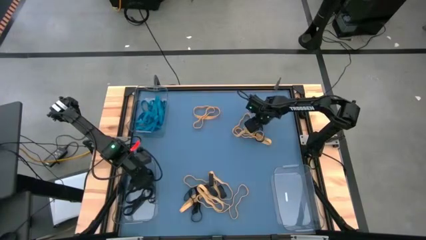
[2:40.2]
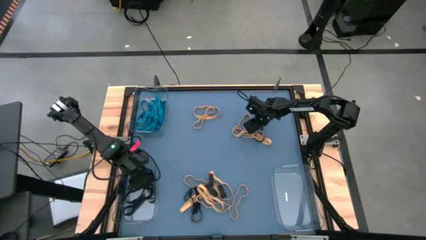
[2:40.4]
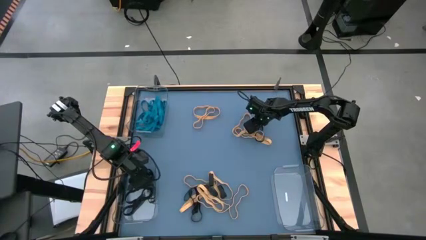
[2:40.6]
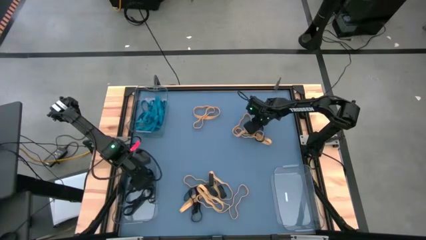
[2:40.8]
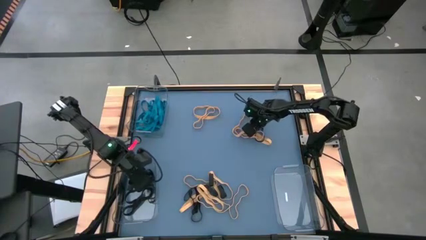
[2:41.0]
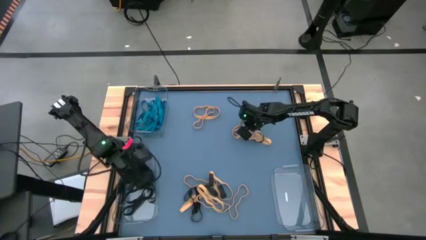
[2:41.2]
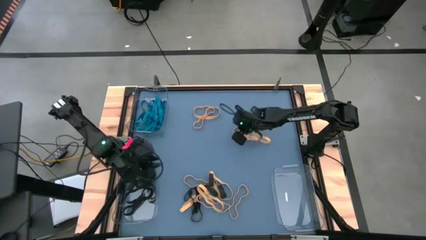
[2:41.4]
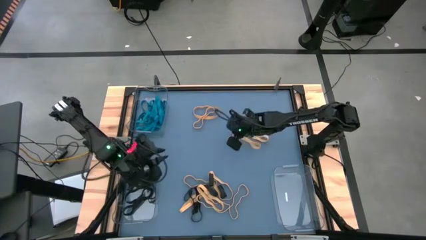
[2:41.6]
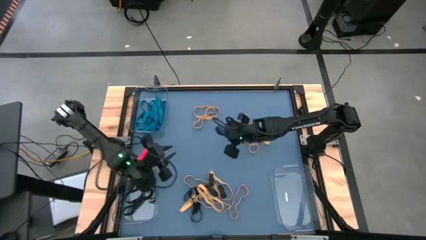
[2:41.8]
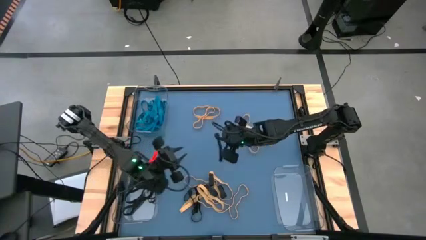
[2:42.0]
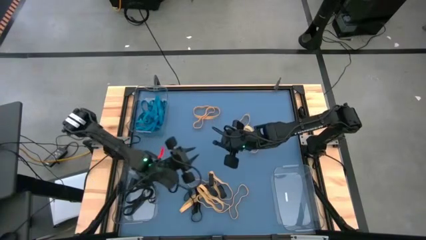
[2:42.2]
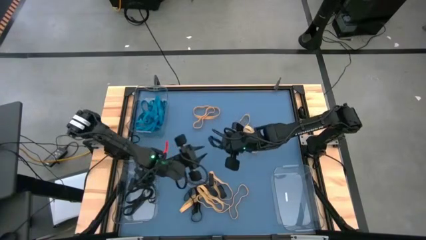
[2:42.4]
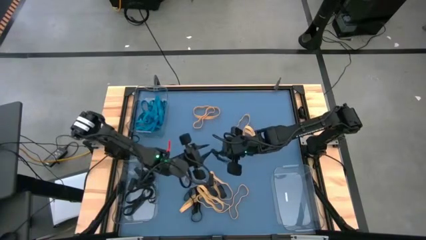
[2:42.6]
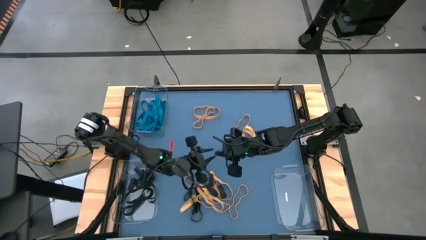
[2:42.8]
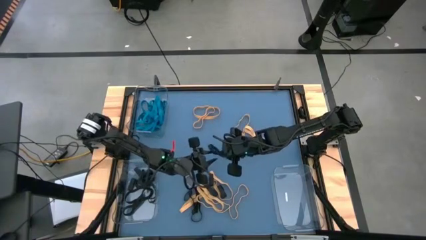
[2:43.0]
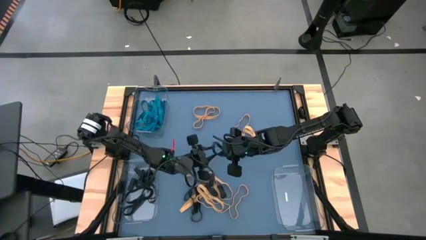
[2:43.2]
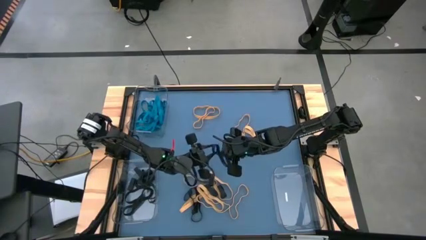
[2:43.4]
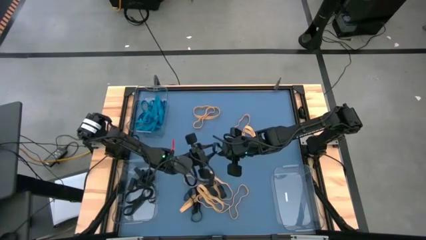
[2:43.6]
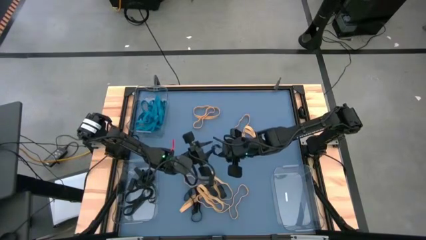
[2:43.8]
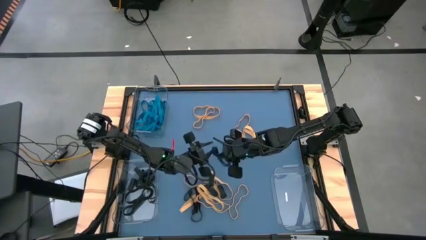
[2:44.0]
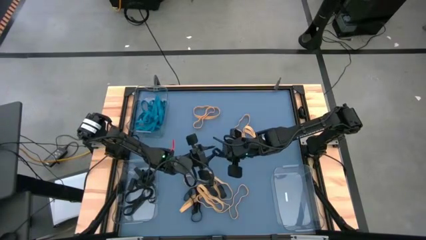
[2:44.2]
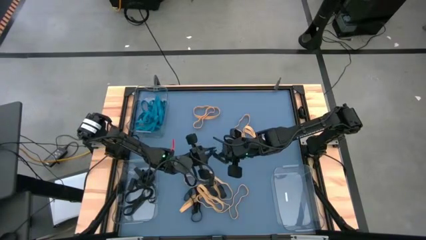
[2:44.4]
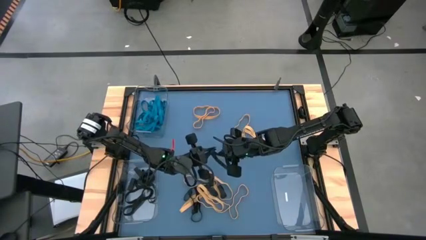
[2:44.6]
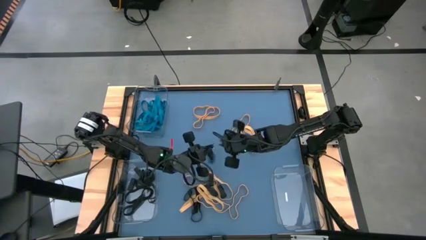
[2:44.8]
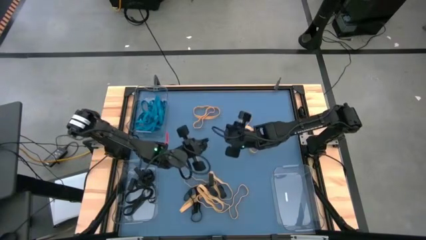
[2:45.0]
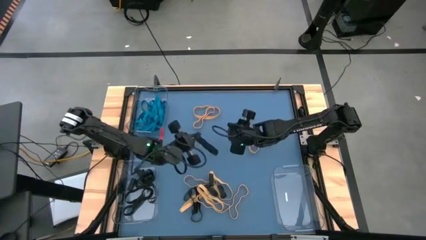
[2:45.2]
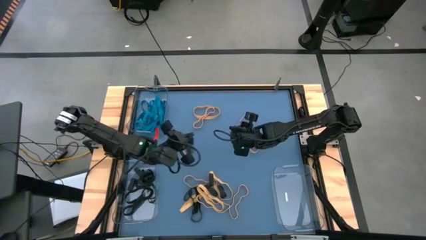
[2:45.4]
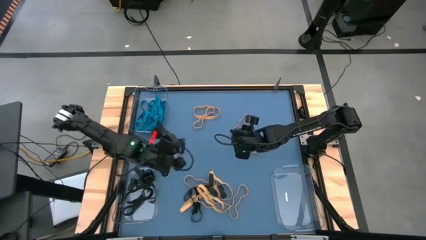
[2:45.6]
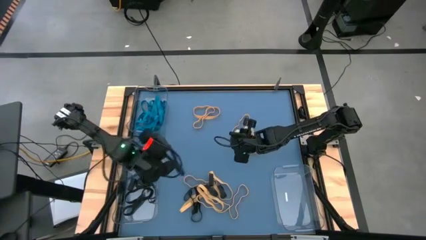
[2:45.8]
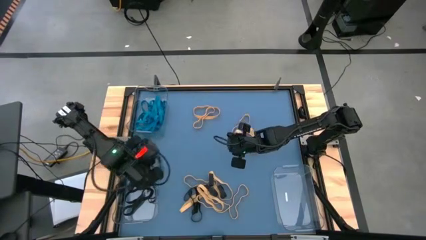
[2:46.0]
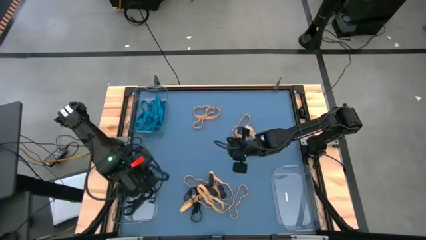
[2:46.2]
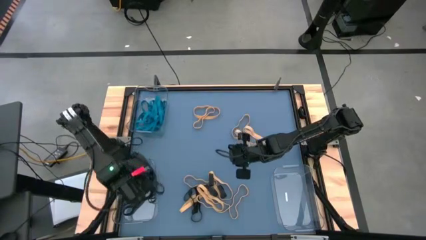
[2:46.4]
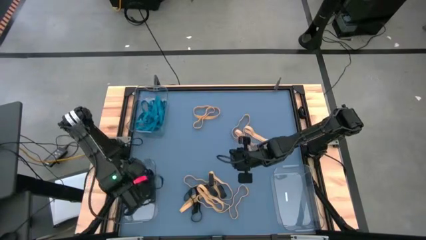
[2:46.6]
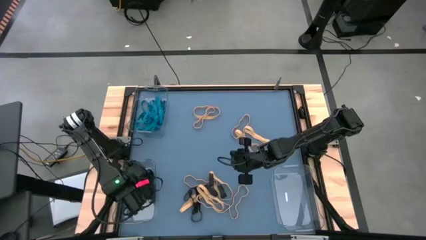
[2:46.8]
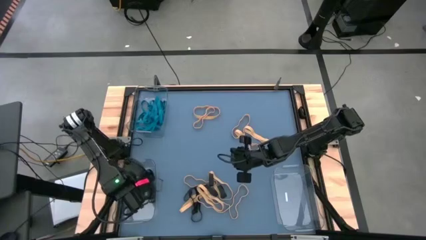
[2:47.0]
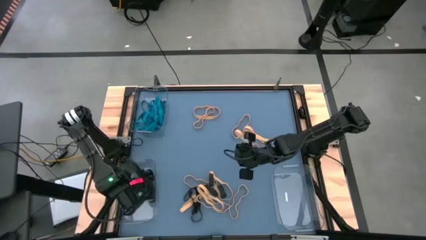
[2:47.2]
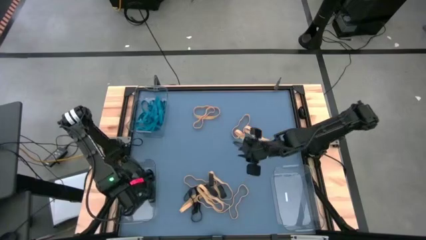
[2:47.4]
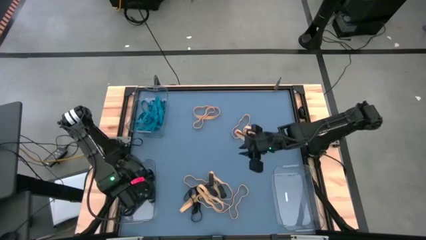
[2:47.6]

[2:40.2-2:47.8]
Task: Sort rubber bands into baskets
Put the black rubber band into the bottom left transparent bin

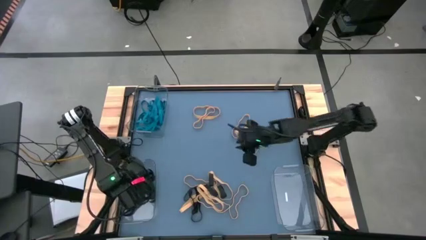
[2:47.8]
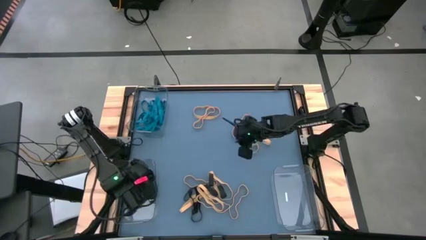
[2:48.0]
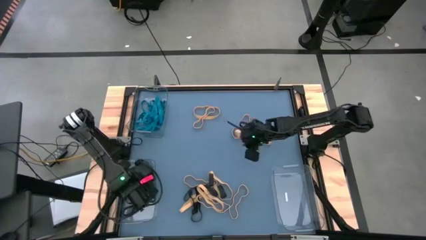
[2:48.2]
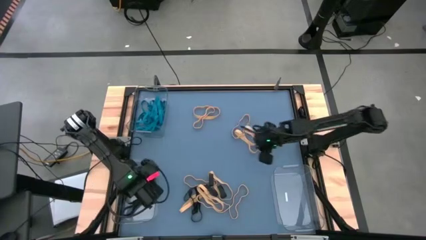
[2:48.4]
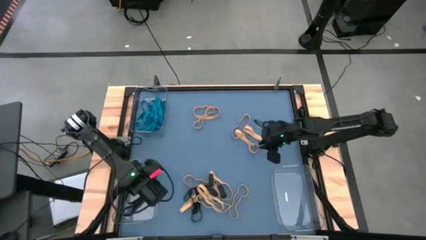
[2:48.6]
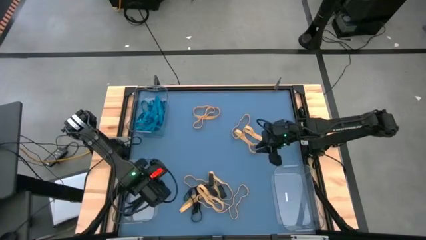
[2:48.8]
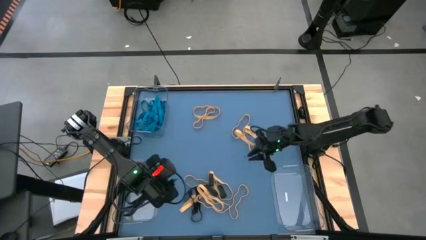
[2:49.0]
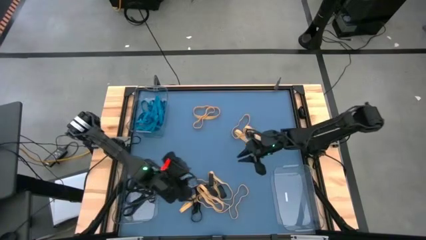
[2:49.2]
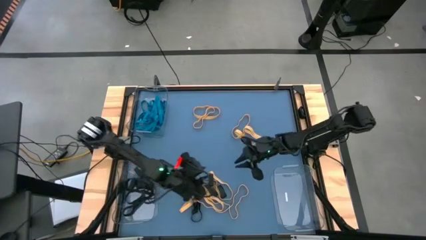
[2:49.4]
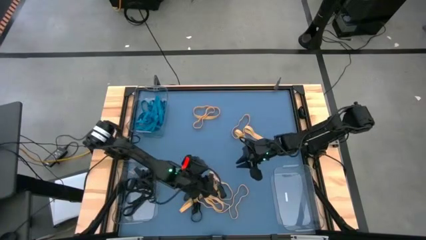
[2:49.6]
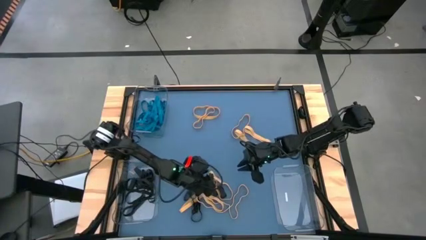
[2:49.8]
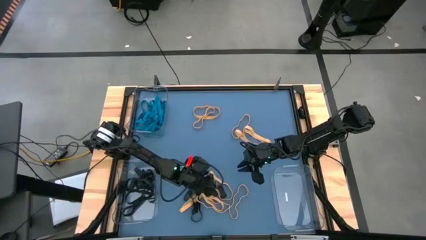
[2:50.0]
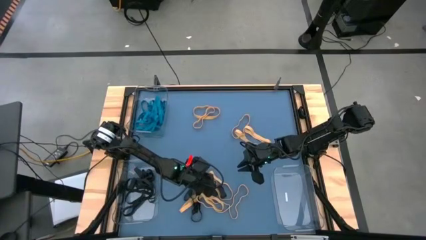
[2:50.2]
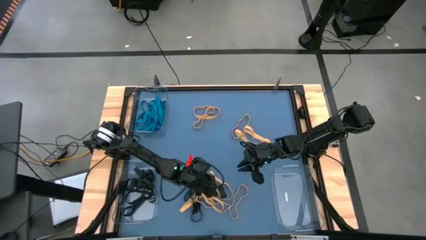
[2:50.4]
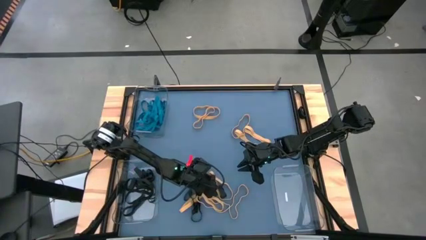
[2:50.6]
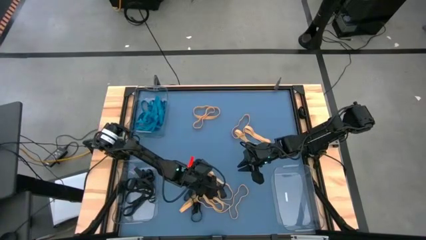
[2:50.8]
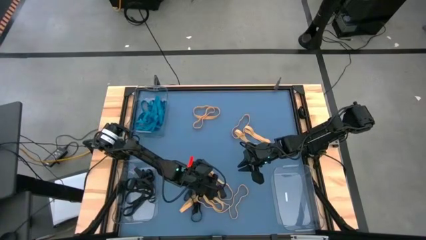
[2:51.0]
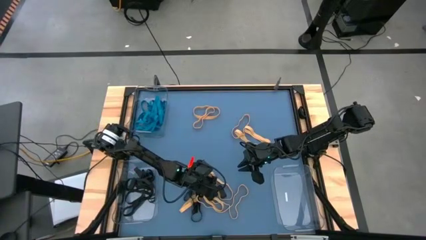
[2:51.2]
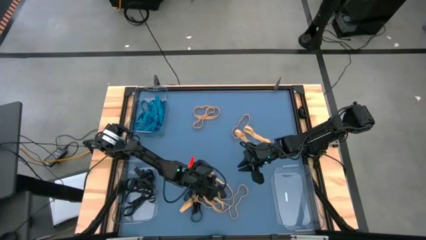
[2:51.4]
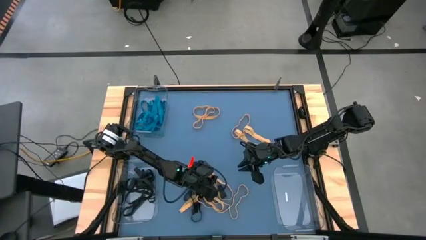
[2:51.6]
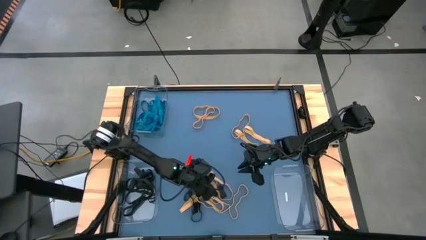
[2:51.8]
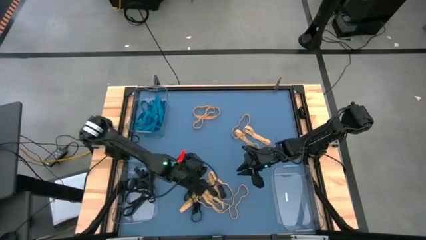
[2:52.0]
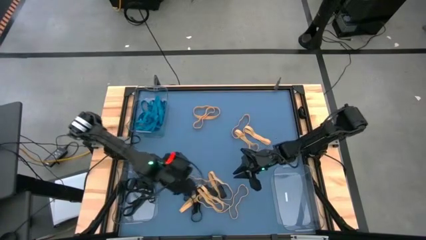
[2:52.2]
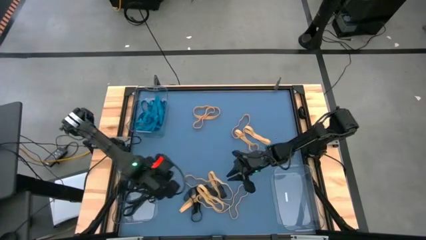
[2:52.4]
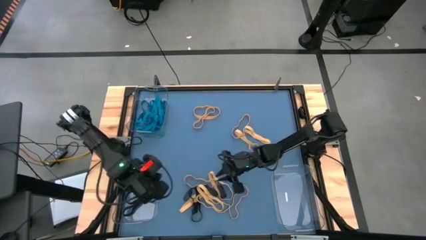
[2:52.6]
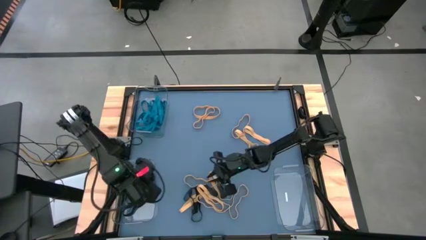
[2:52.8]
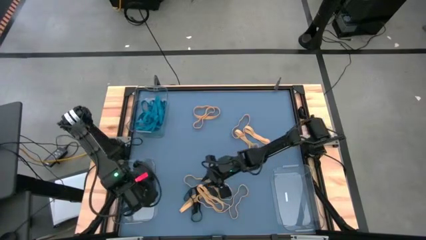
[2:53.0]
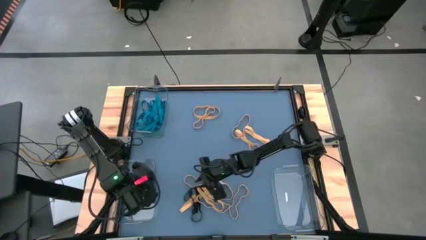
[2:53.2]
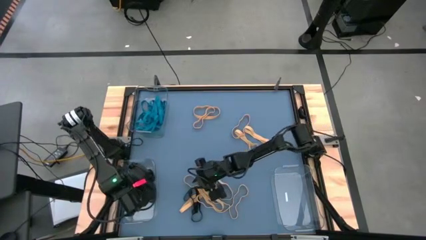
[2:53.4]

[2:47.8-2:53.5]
Put the black rubber band into the bottom left transparent bin

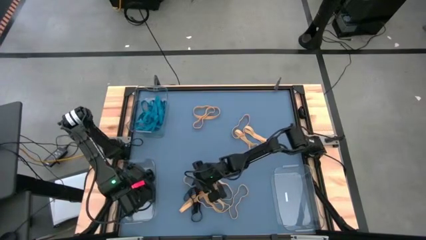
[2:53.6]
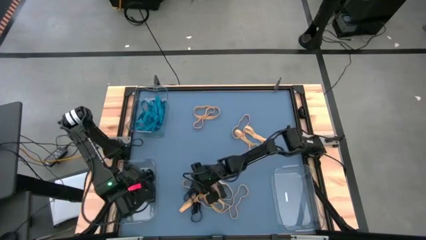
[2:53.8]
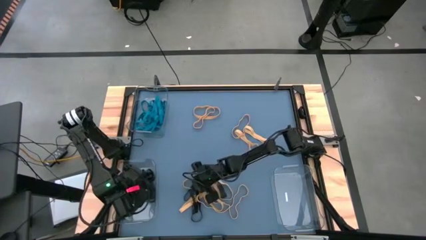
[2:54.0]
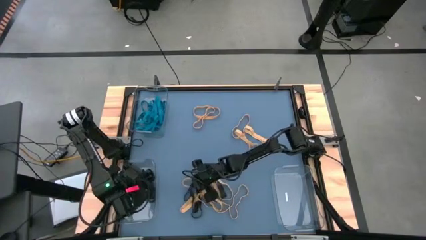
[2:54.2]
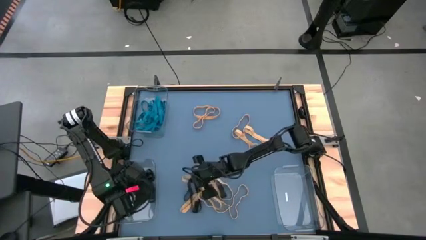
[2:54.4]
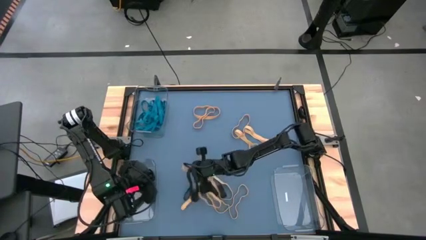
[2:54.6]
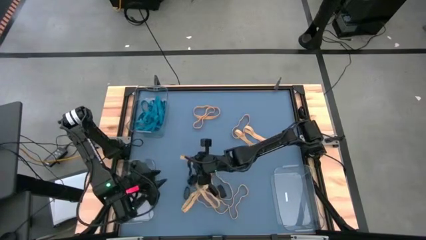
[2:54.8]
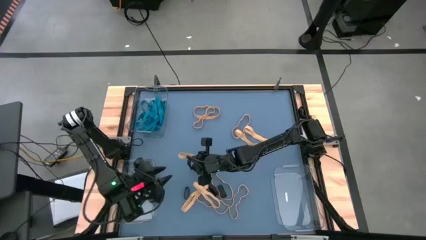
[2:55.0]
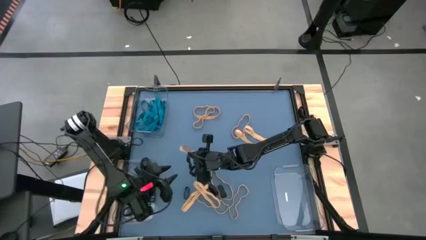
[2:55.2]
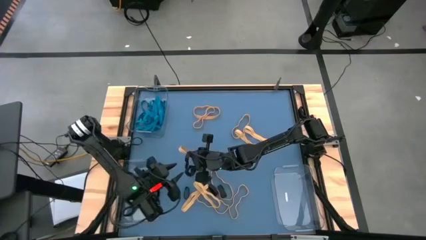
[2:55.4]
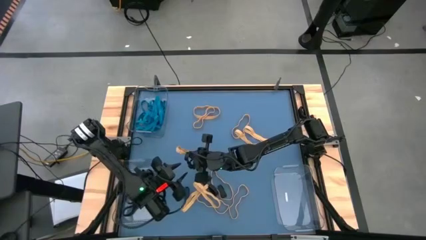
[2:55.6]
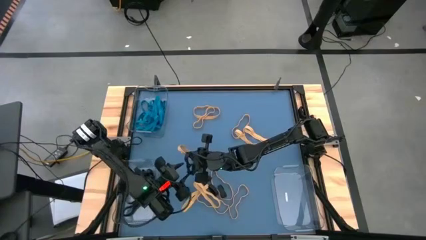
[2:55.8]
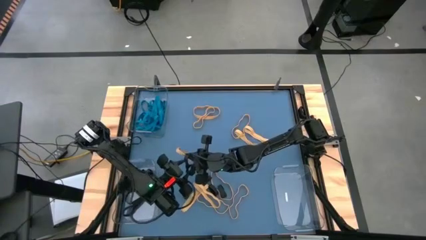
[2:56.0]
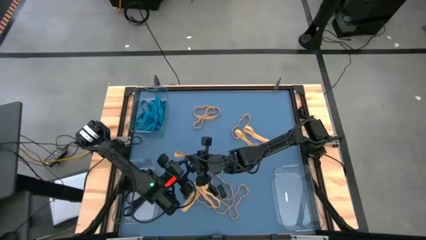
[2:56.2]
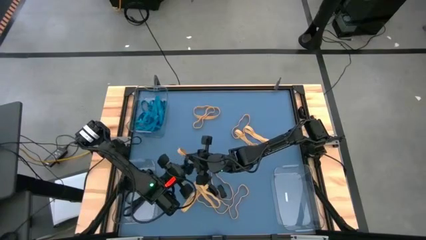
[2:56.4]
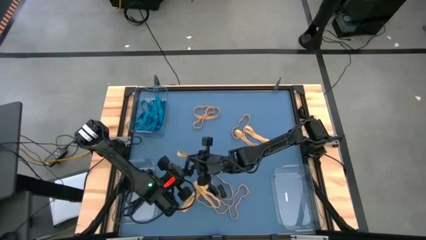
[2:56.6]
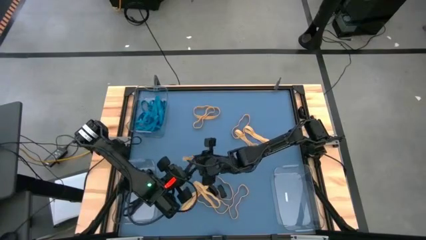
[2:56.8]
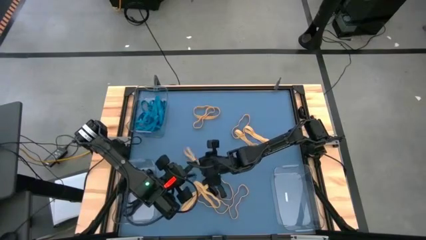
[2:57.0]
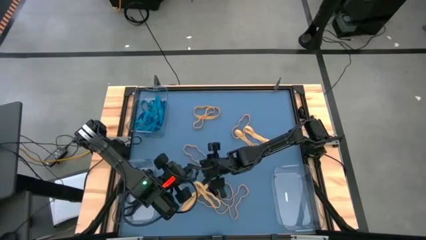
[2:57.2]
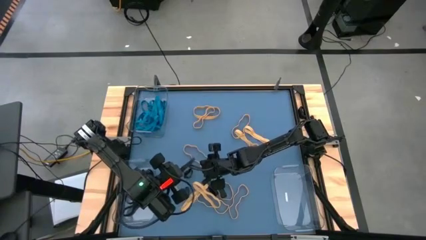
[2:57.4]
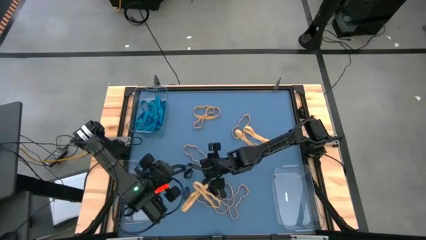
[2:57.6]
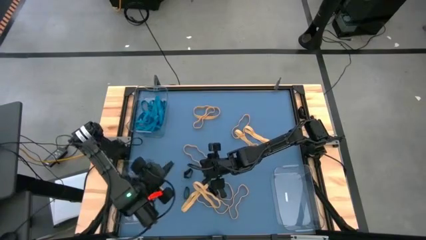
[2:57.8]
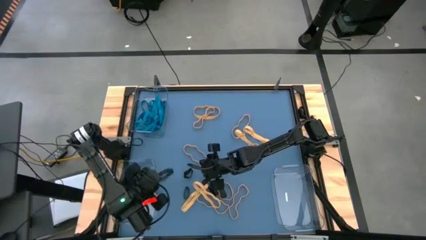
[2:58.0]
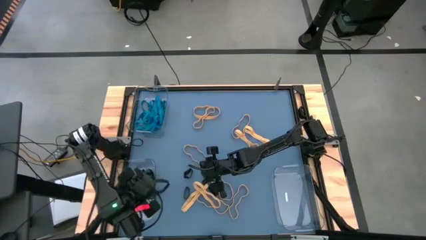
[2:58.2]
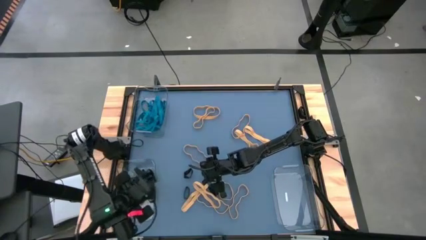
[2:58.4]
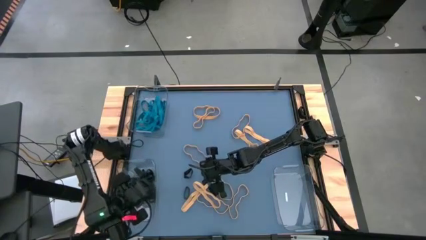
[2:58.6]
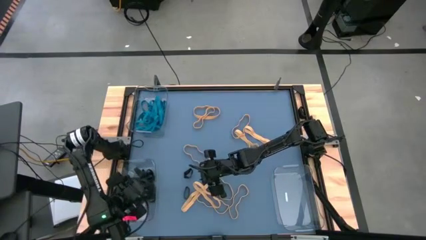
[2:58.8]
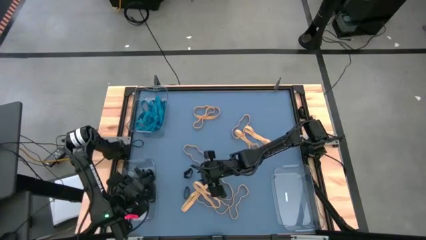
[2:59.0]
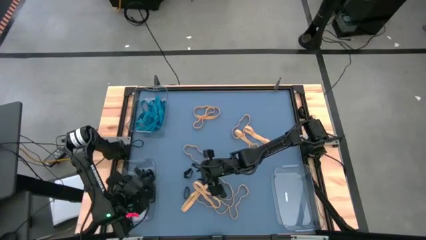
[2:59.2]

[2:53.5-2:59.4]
Put the black rubber band into the bottom left transparent bin
